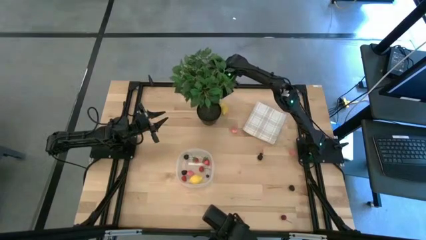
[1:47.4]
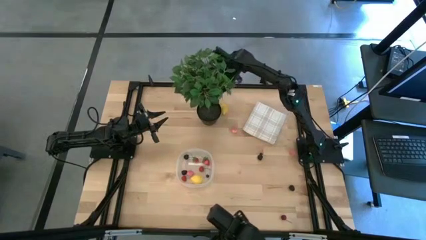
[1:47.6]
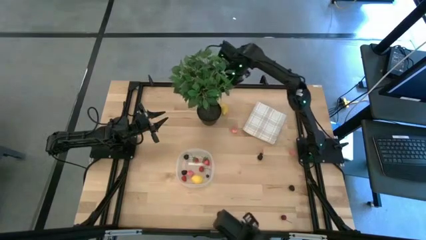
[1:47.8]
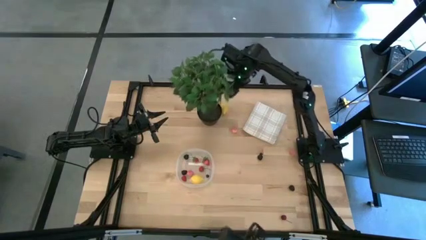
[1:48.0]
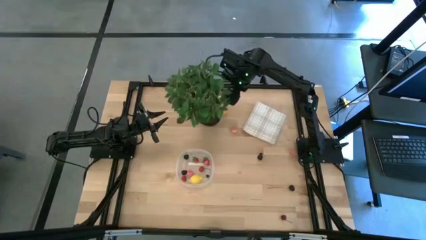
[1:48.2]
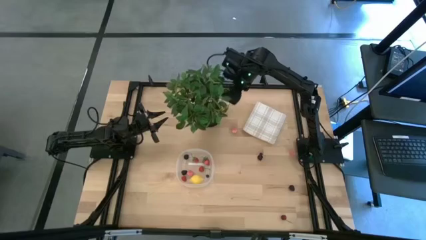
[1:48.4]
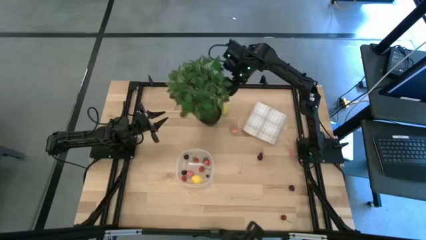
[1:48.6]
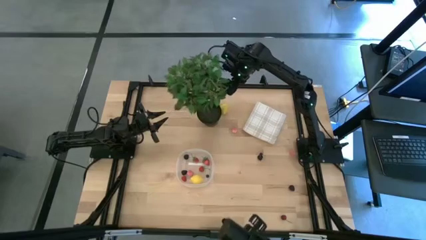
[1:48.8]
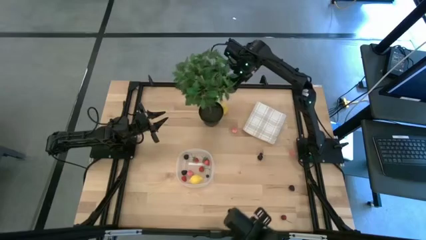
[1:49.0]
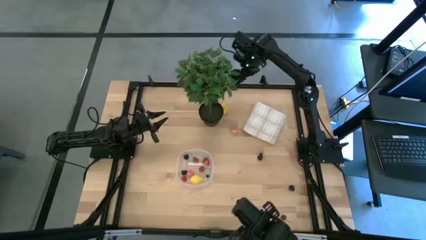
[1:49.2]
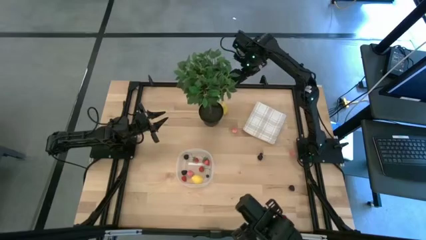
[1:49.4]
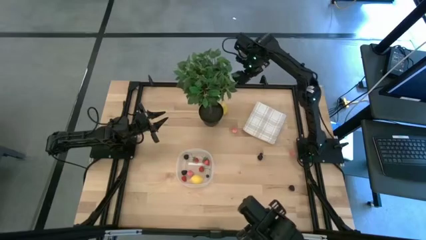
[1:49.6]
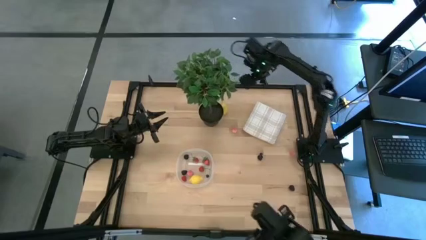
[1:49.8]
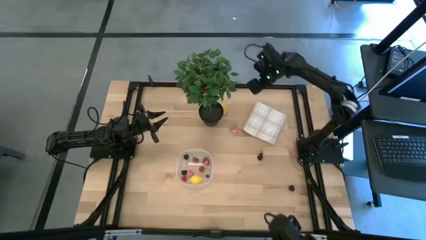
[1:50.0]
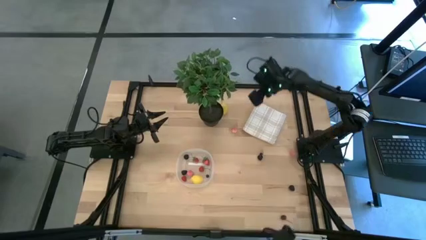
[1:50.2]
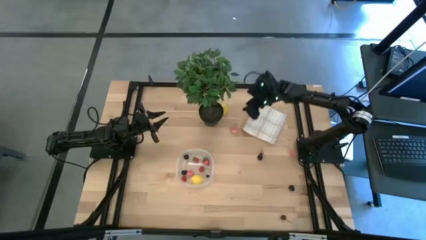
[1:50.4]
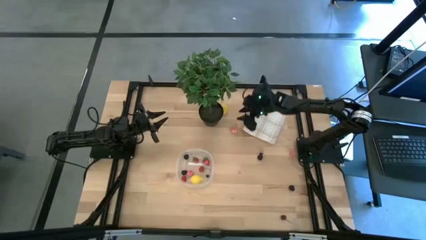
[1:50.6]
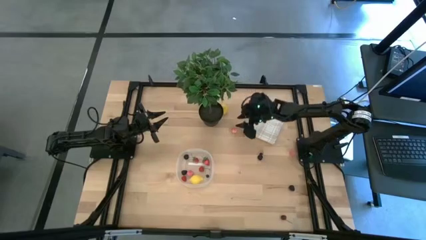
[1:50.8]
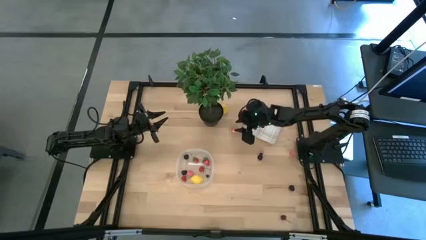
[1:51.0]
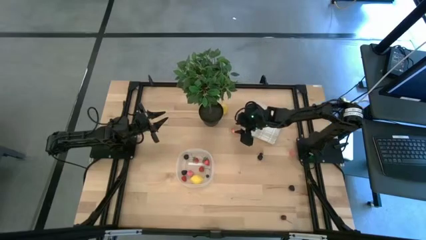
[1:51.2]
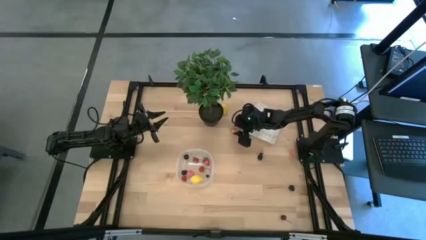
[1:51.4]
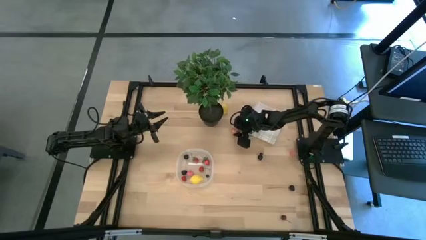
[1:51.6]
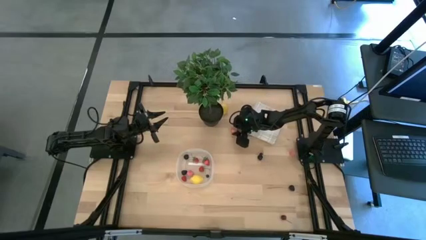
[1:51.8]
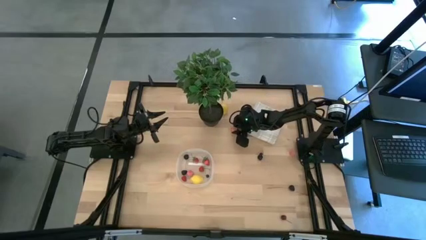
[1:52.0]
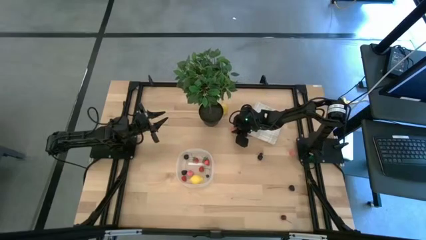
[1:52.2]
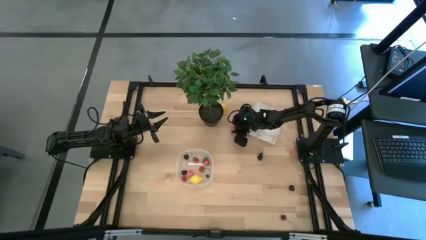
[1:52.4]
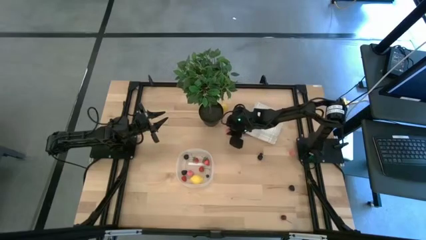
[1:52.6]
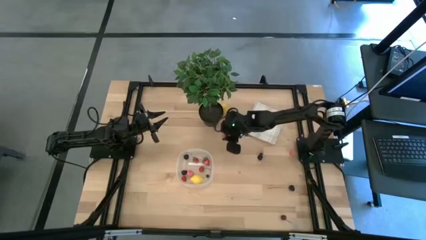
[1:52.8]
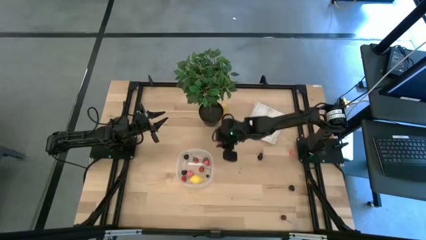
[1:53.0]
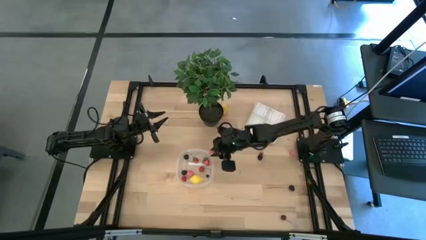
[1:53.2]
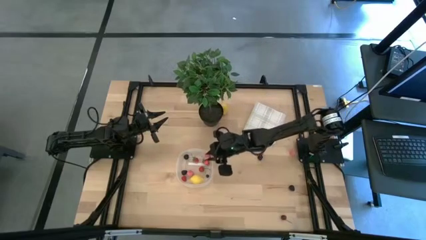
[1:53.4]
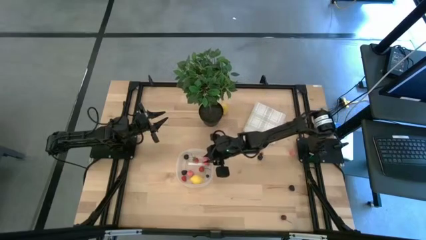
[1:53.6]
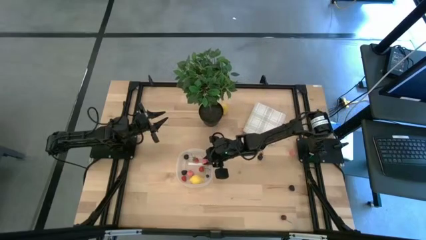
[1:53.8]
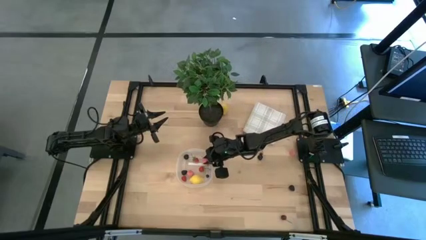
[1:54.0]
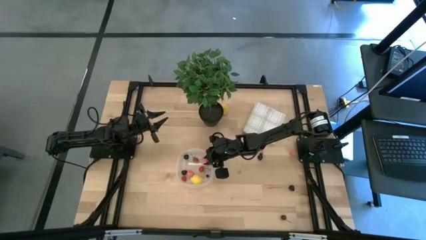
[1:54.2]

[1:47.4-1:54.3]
Task: Pick and placing Produce into tupperware
Put the top pink peach into the transparent bin

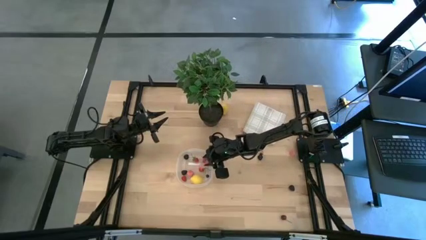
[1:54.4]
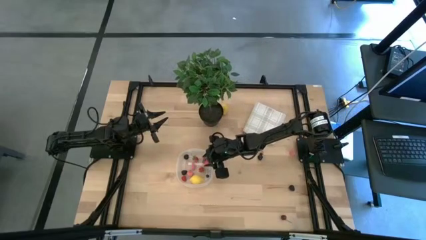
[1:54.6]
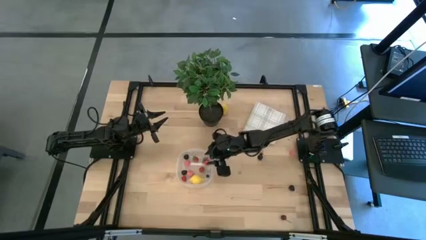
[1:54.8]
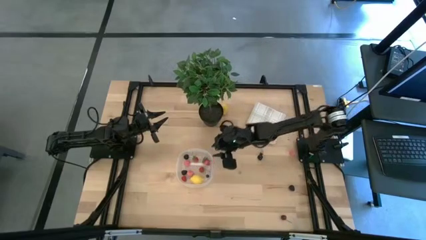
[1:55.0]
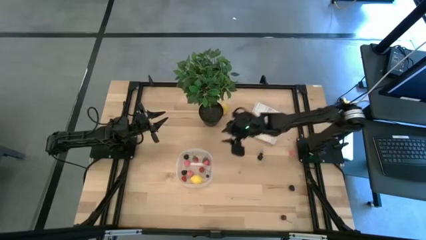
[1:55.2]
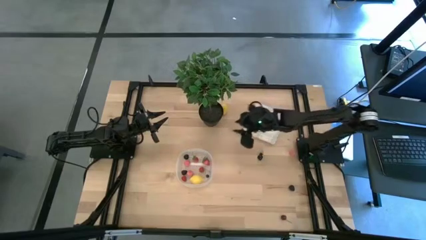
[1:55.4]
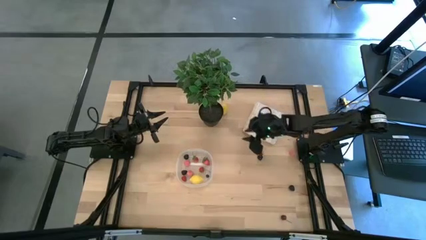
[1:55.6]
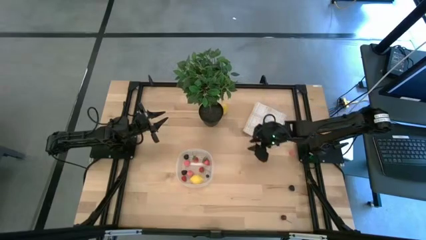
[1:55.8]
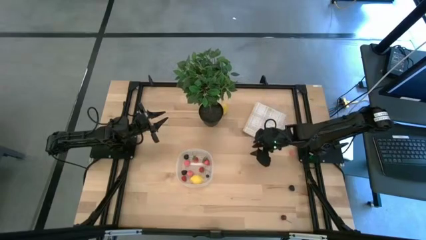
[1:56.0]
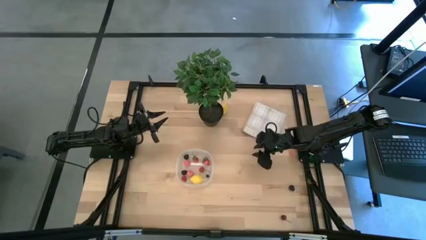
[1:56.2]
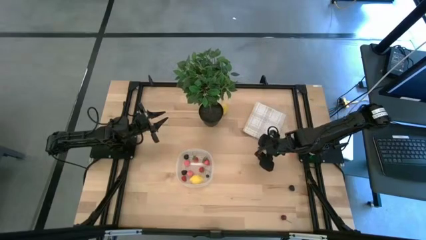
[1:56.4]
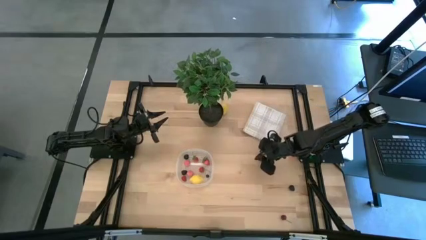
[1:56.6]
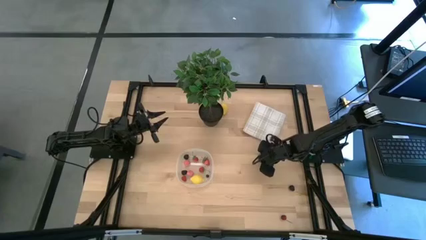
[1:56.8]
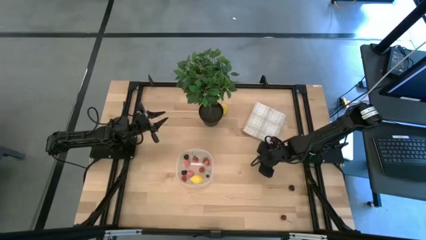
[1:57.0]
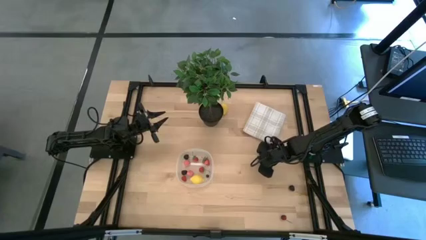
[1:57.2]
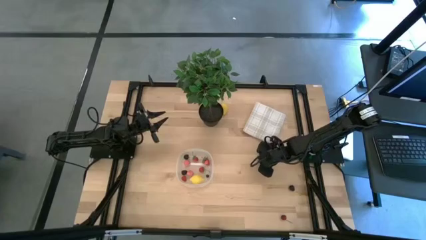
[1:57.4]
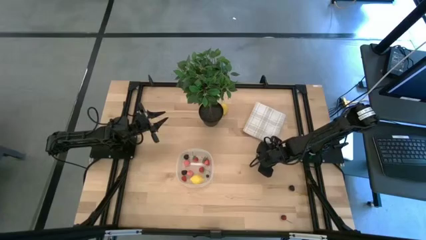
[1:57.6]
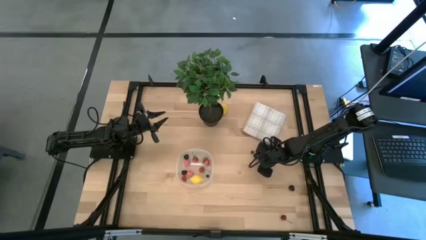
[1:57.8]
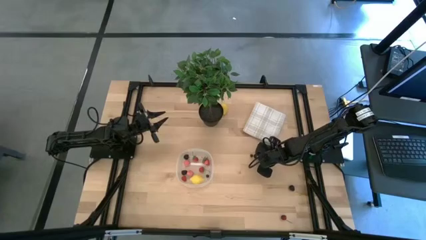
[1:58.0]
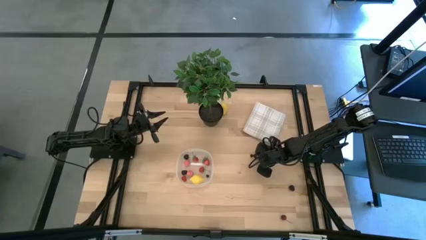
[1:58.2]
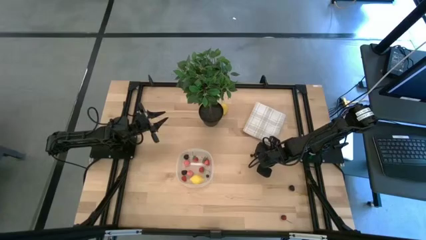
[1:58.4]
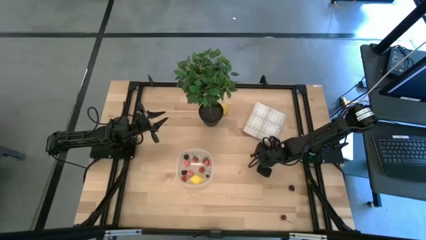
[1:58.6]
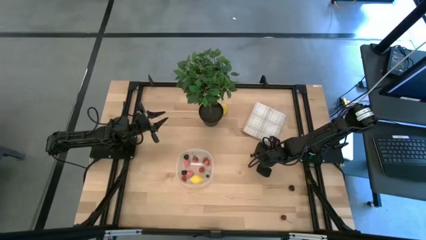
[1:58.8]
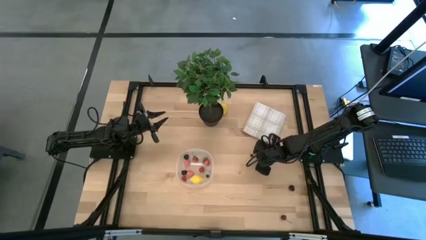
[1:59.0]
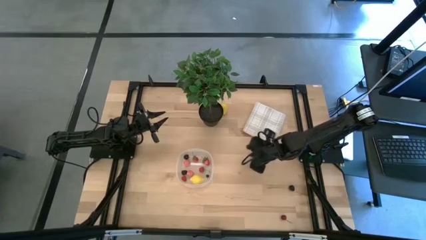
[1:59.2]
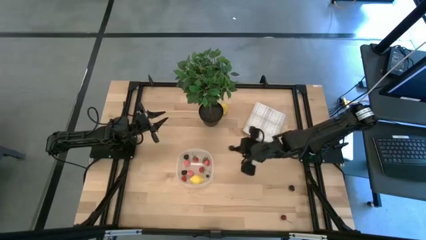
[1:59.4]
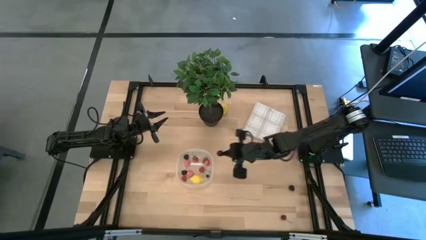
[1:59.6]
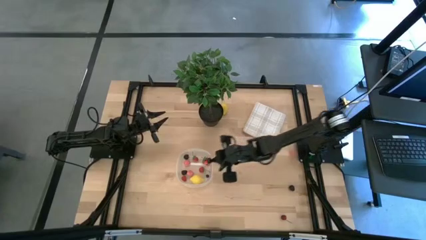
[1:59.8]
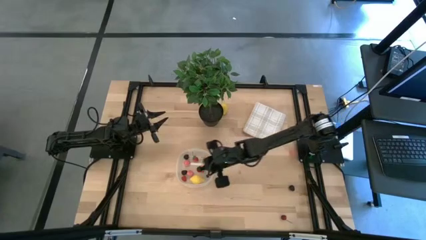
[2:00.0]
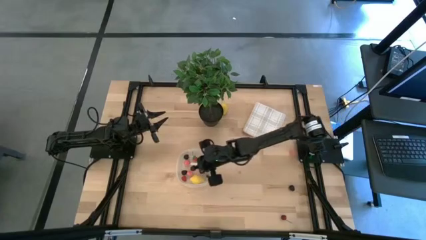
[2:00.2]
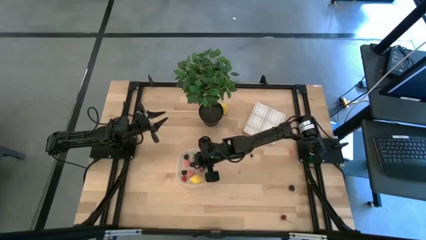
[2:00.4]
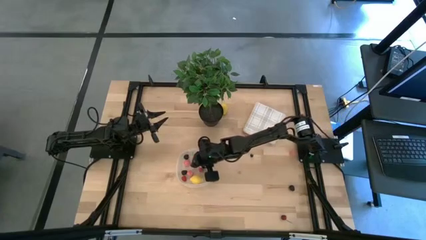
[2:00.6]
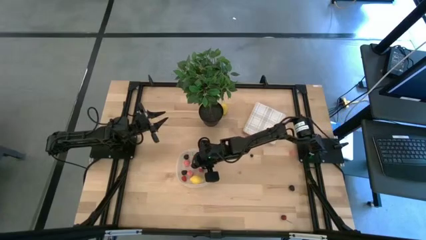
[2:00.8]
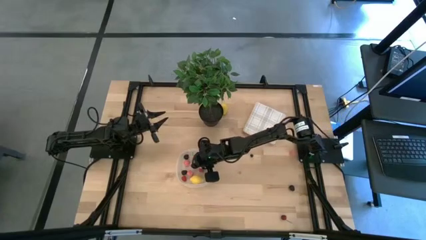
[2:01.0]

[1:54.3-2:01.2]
Put the black cherry into the transparent bin

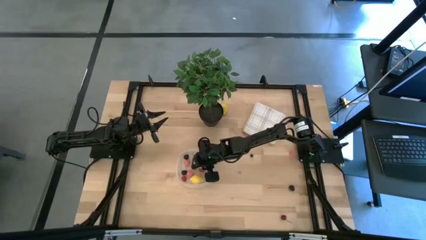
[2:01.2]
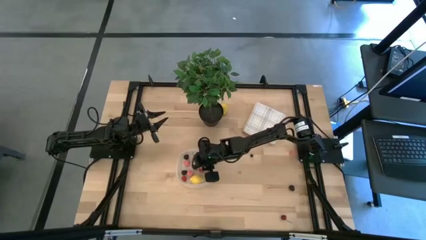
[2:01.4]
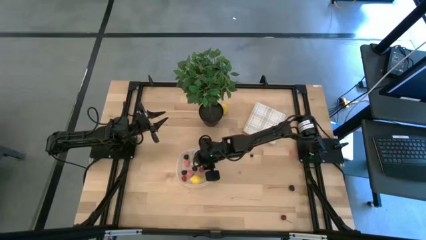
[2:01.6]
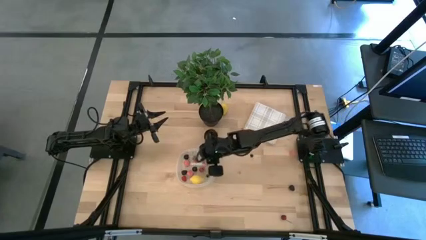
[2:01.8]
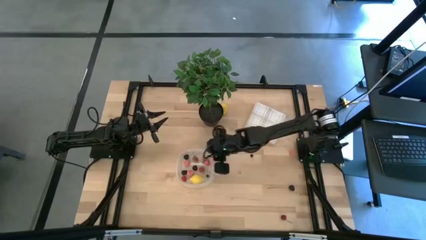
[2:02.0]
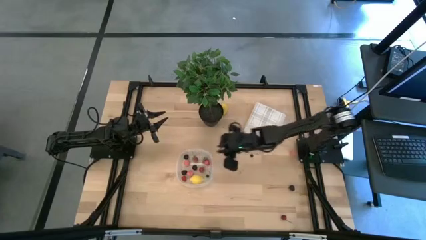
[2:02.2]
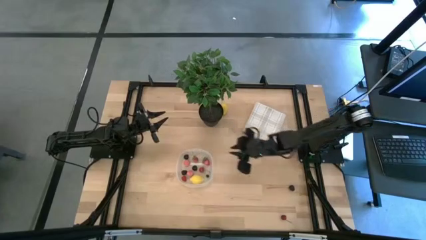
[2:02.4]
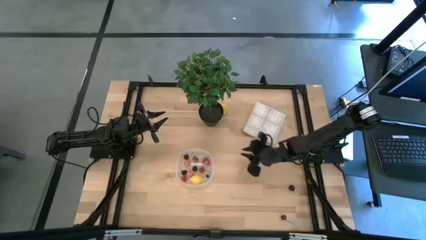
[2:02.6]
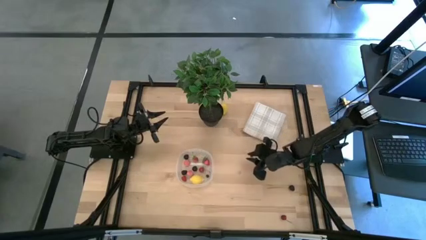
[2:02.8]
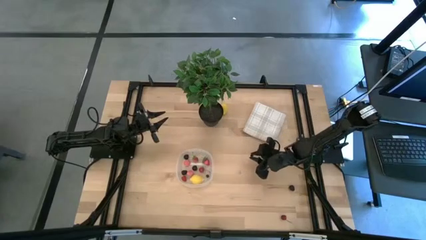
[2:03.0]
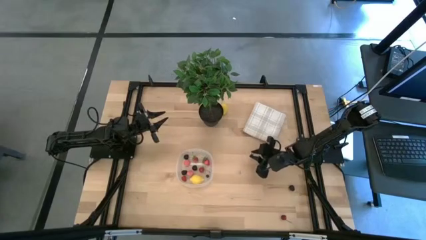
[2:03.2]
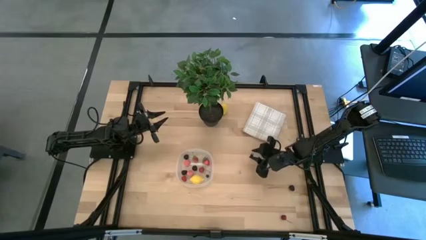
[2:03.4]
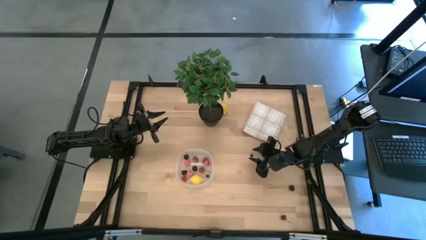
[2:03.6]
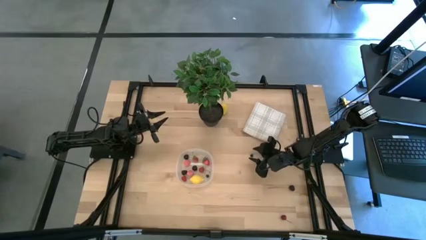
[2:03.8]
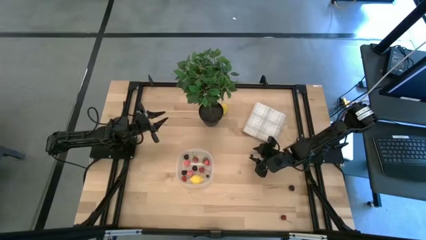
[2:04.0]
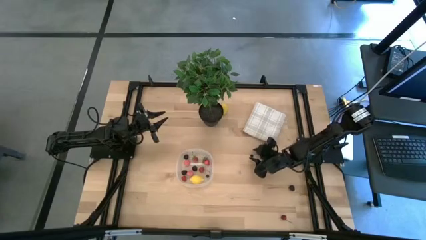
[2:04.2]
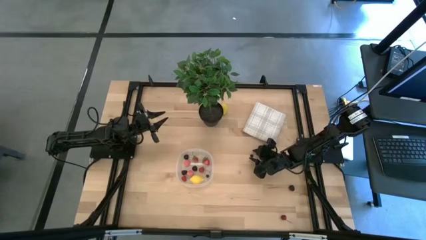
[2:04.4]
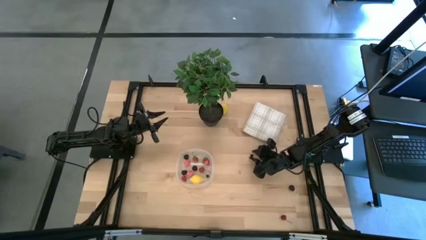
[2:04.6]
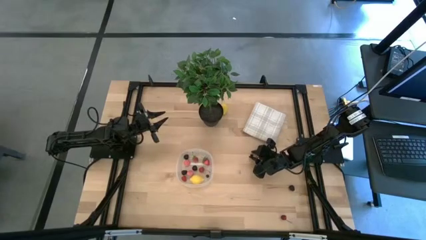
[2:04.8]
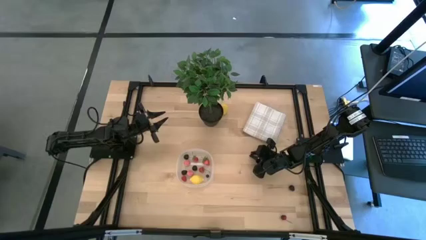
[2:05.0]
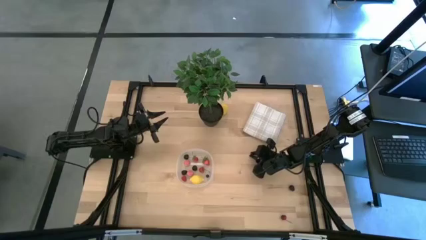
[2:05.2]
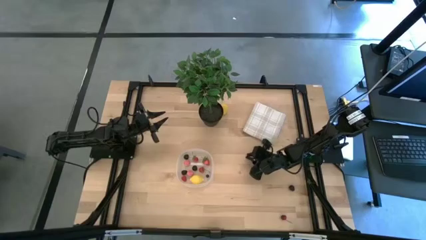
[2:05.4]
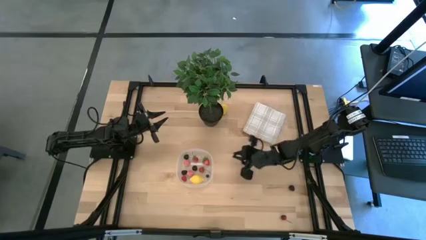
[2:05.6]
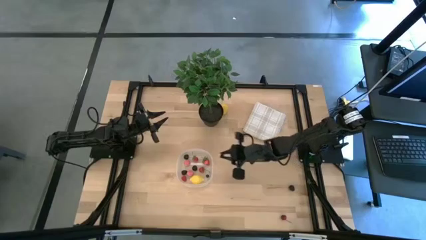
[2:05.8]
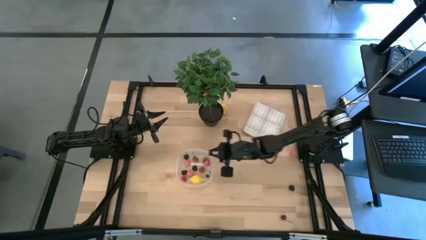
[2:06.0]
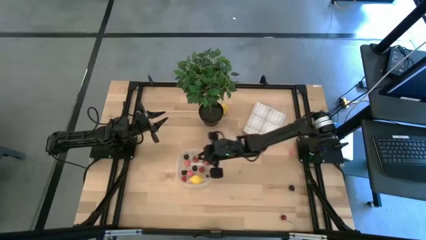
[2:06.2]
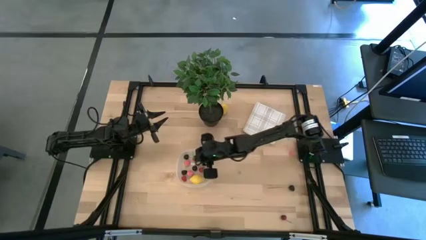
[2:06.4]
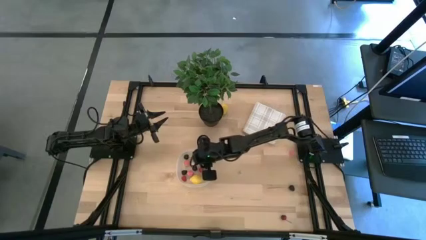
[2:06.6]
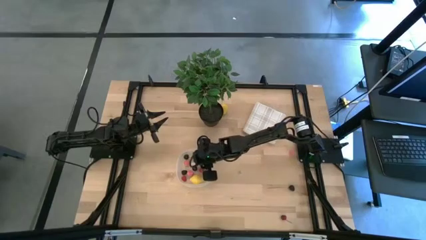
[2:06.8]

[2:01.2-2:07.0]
Put the blueberry into the transparent bin
